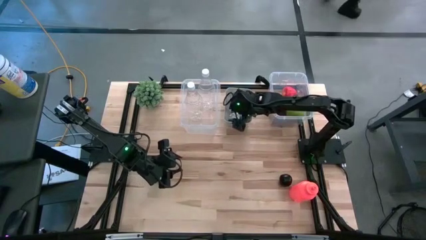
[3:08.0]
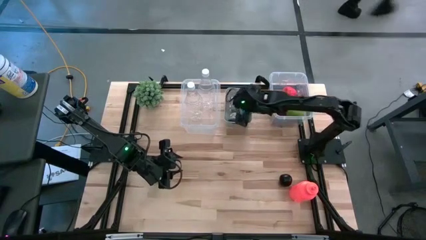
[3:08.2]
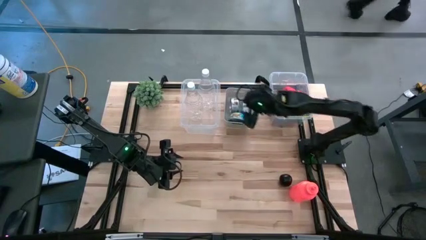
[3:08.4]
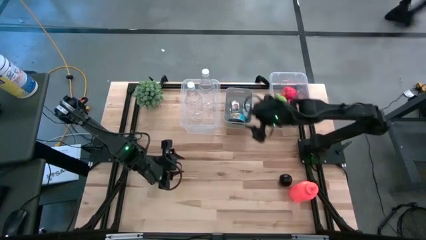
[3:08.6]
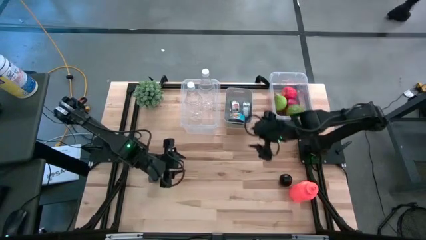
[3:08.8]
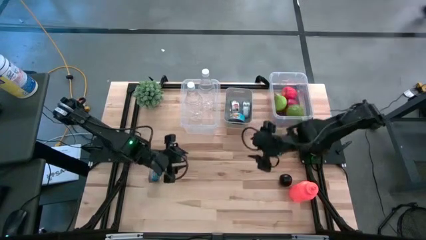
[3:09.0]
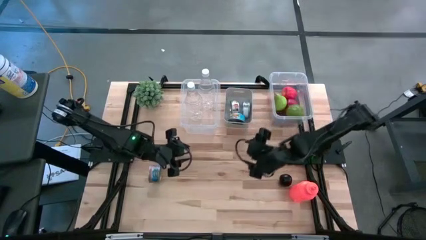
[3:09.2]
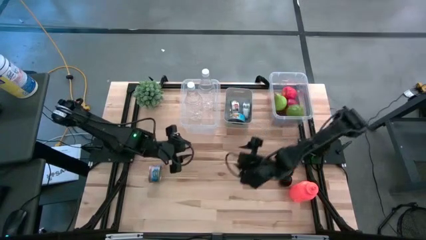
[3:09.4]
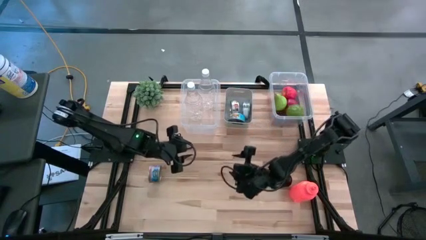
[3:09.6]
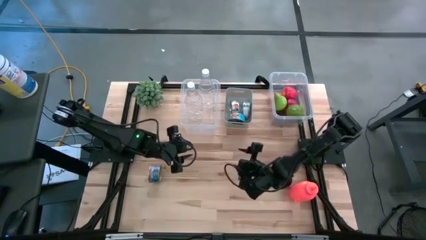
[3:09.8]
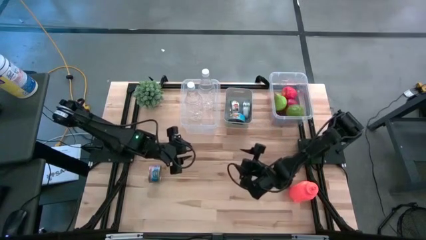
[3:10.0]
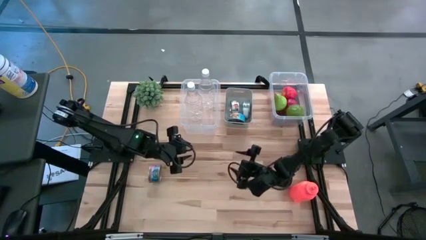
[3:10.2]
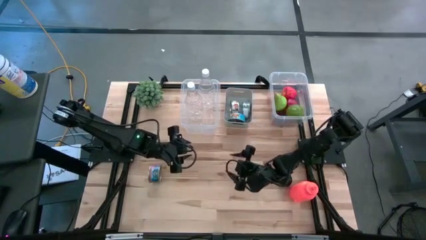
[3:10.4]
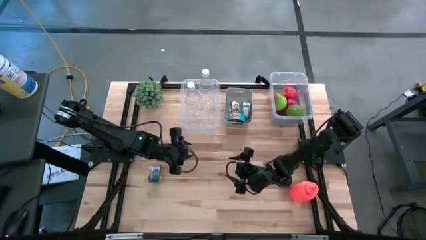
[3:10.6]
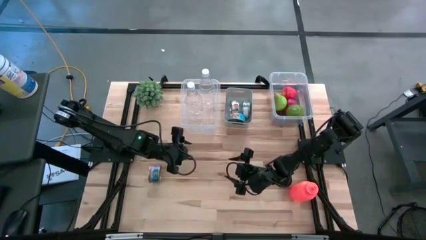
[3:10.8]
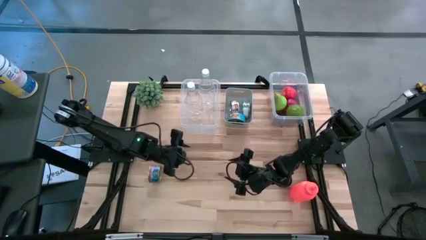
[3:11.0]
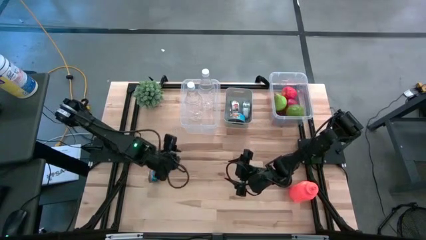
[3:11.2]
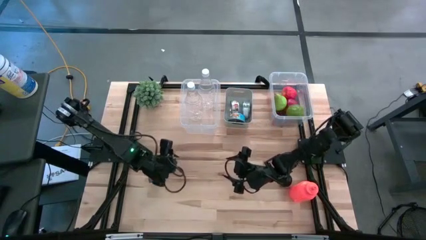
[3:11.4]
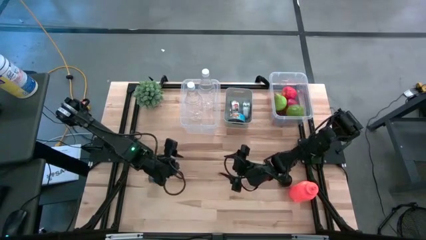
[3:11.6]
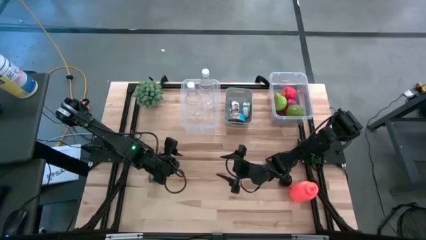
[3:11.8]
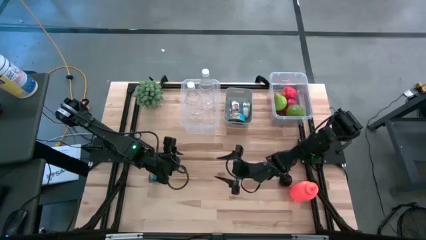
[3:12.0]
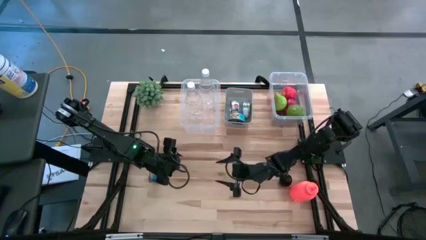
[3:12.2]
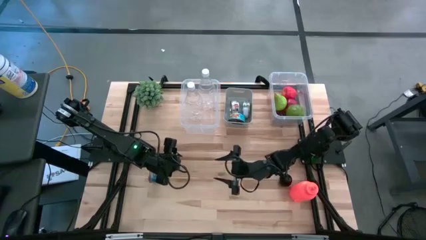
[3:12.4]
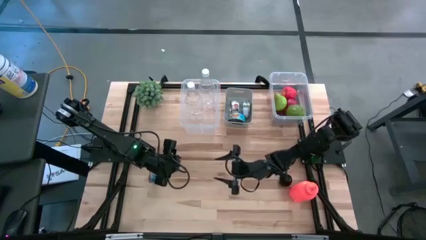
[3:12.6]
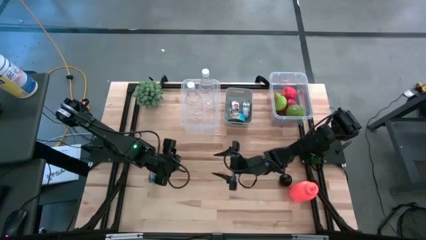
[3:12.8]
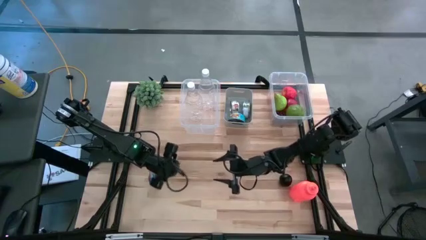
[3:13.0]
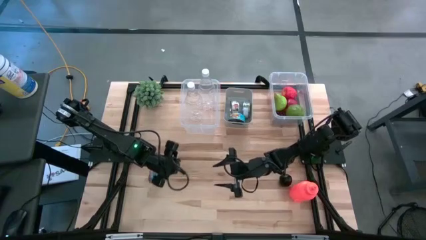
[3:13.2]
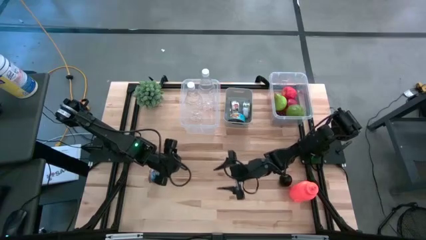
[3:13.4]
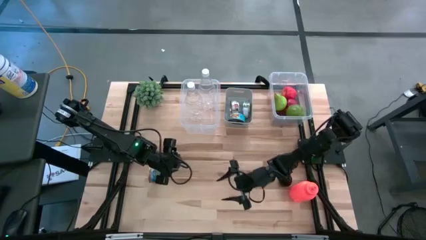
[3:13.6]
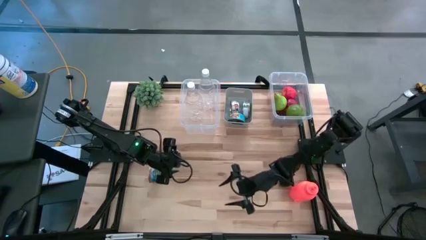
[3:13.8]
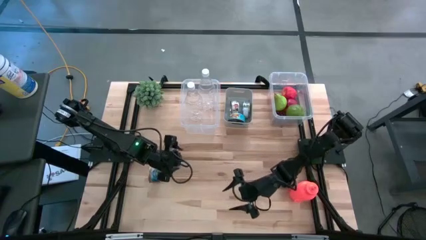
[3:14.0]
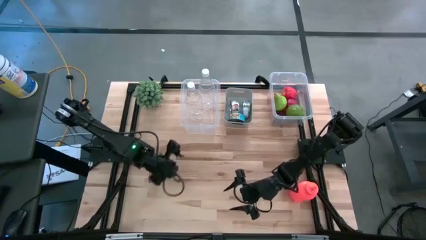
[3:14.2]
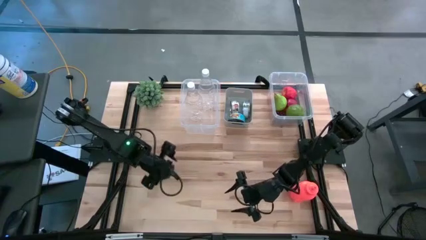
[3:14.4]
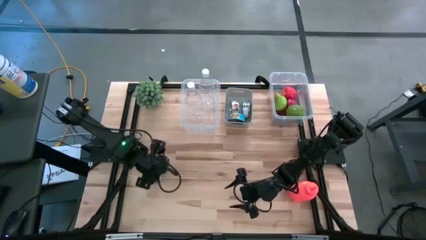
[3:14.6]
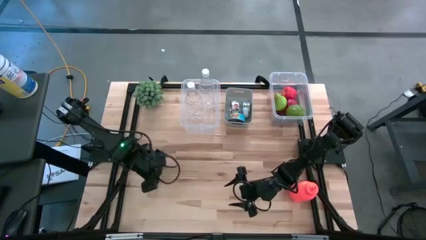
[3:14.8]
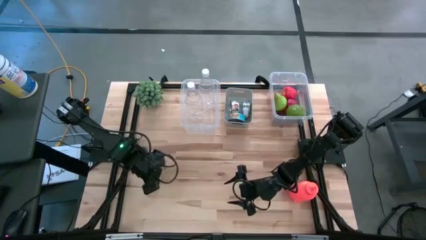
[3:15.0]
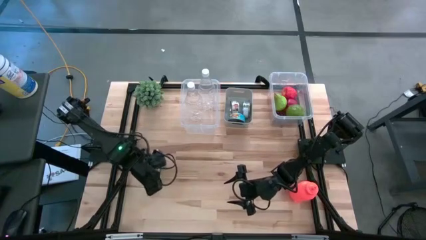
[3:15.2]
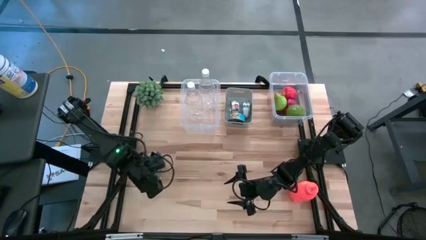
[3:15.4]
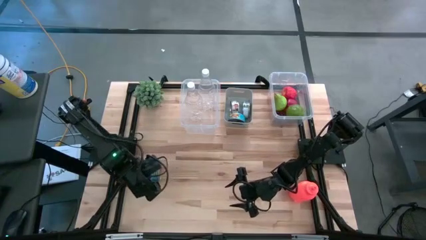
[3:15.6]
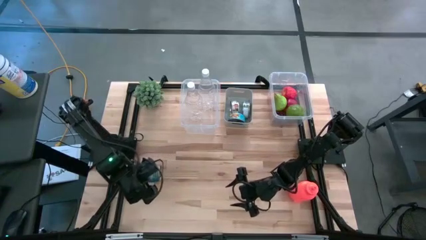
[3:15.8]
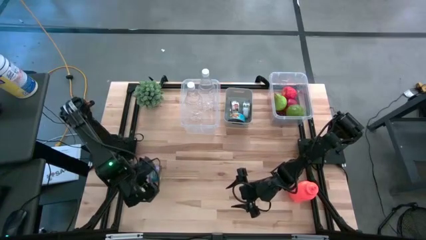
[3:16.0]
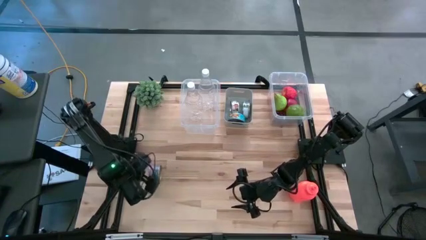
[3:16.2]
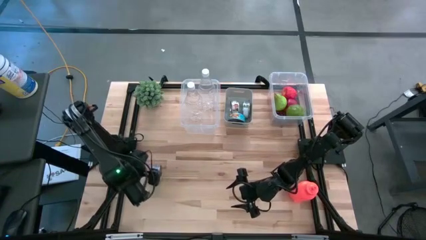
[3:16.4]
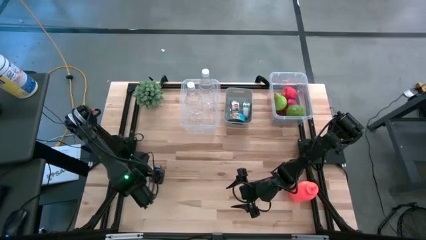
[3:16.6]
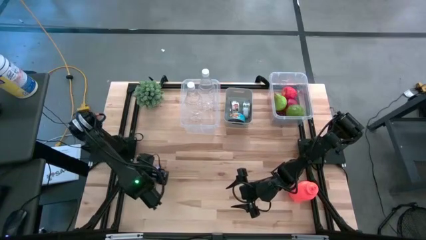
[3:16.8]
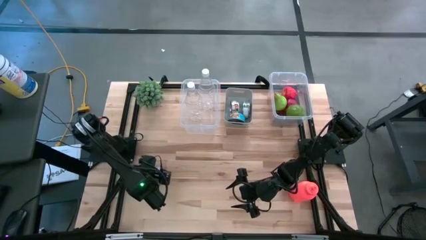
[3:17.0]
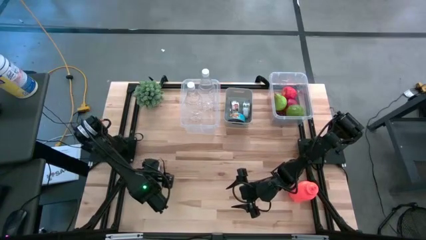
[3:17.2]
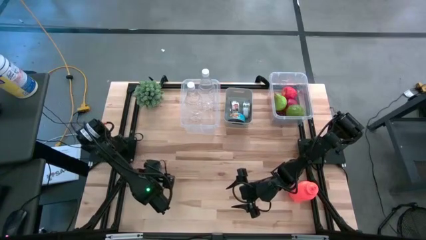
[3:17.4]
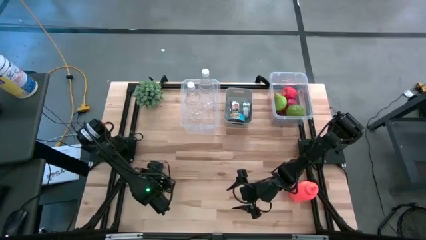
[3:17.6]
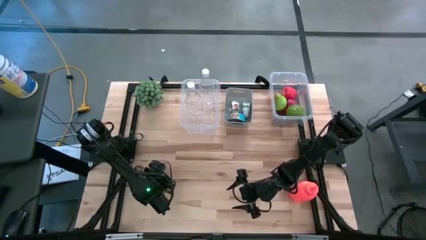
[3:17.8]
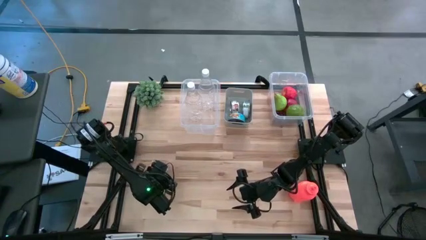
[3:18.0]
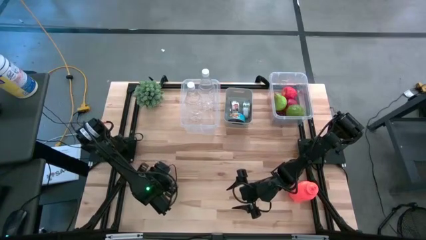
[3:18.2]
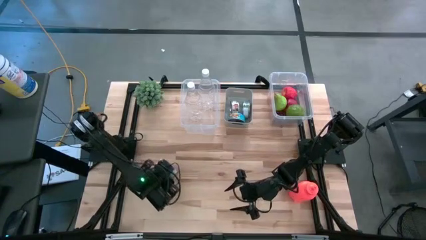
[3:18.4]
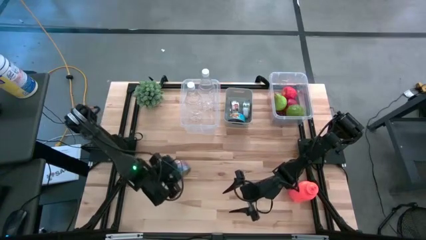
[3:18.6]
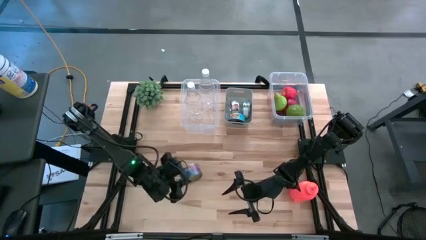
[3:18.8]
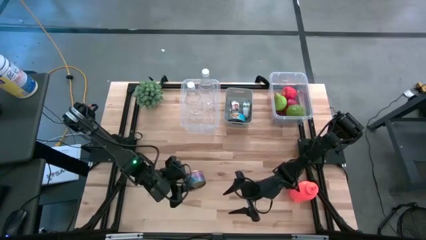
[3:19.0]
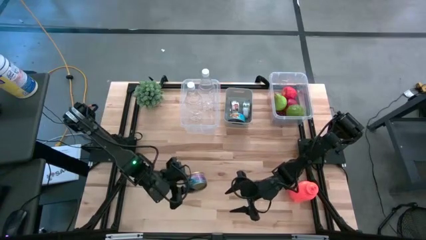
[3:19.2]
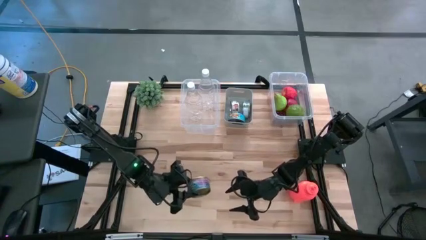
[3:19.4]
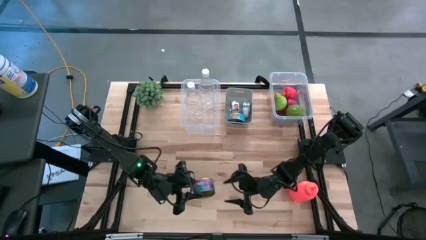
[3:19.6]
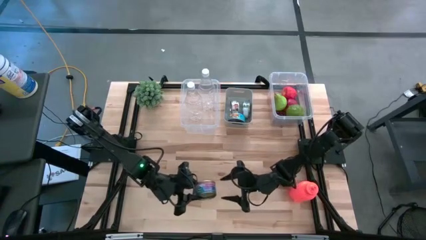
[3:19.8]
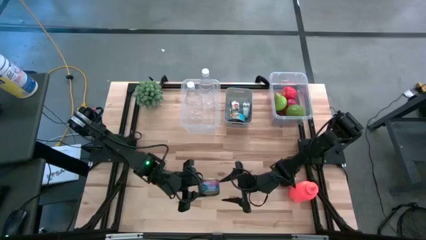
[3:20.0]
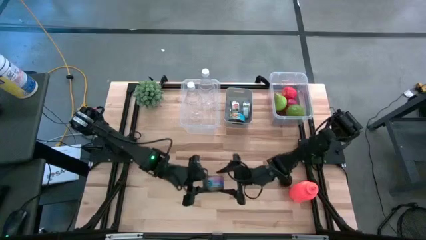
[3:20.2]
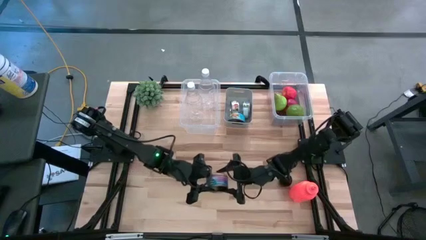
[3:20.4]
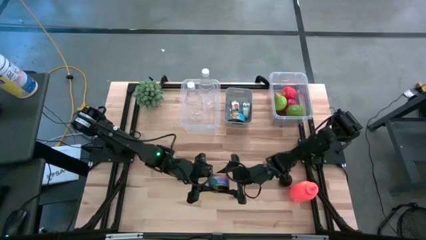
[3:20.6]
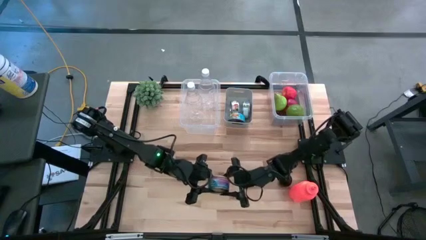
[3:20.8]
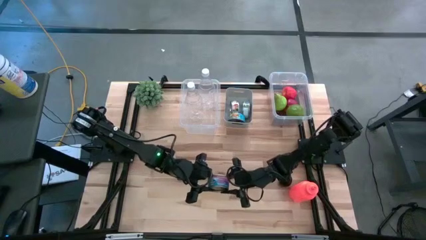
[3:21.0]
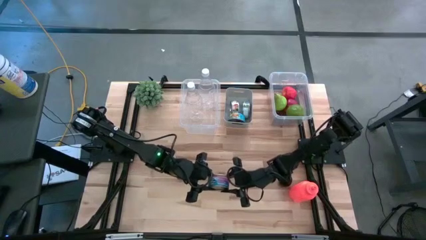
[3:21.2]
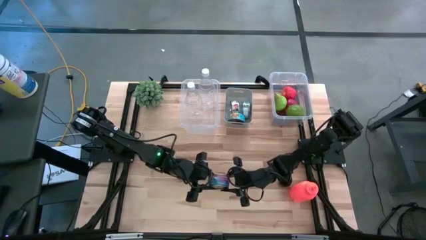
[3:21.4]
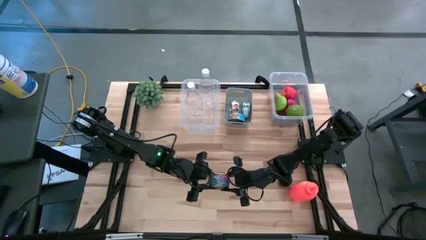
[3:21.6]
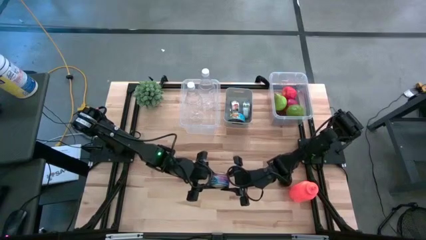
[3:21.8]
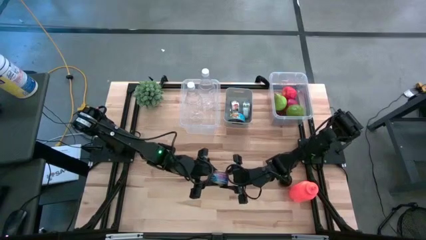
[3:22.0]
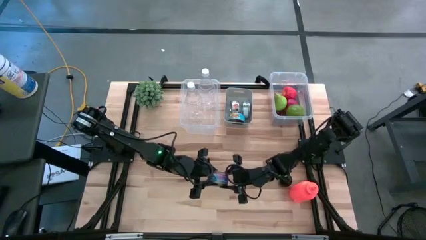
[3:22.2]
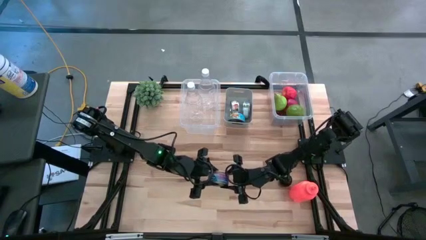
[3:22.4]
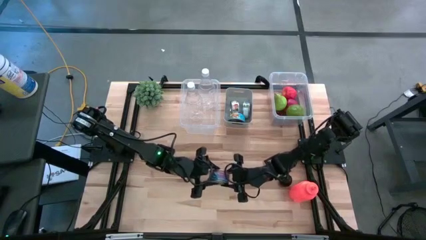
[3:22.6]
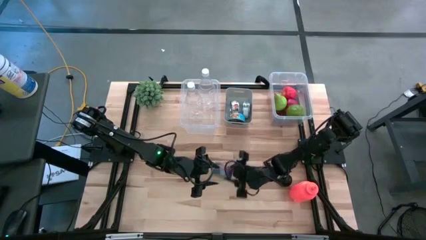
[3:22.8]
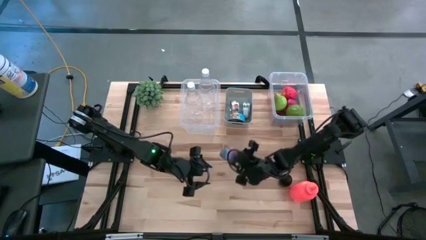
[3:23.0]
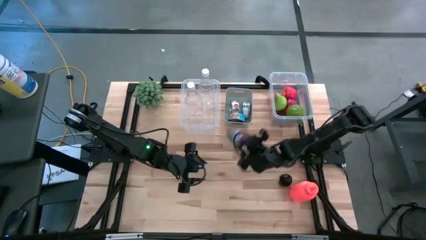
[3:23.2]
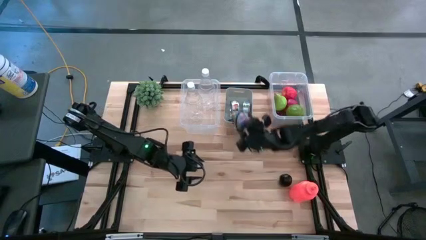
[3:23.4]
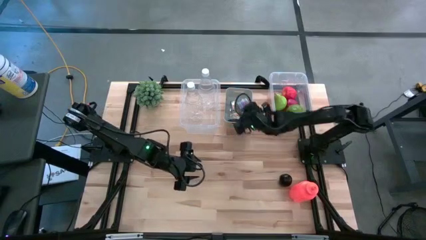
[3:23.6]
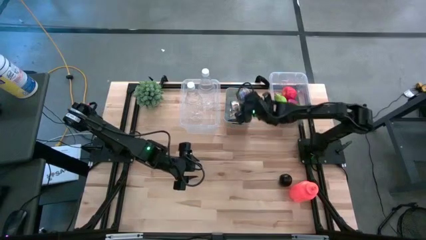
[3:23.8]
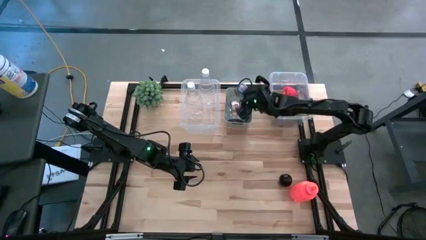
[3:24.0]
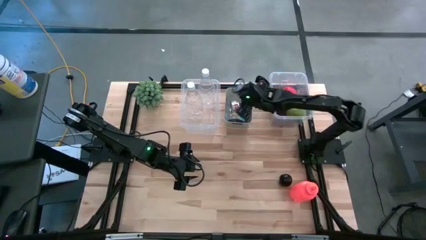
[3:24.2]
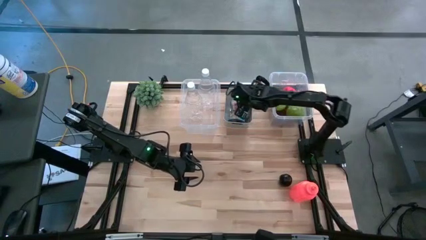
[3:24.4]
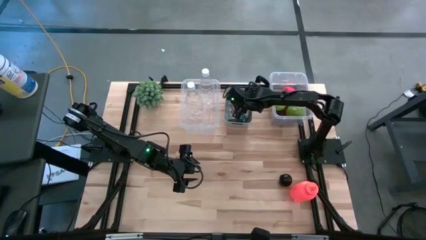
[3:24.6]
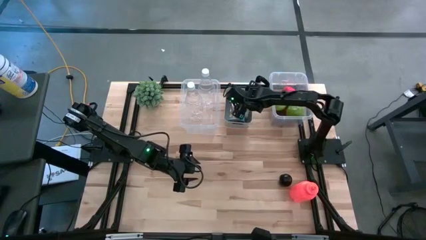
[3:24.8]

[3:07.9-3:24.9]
Task: Pick & Place Food Item
Put the blue tuna can into the bin
